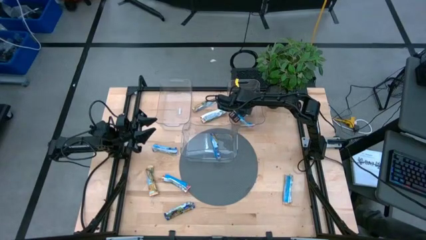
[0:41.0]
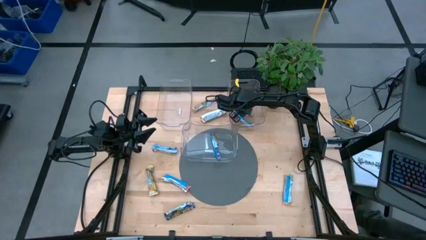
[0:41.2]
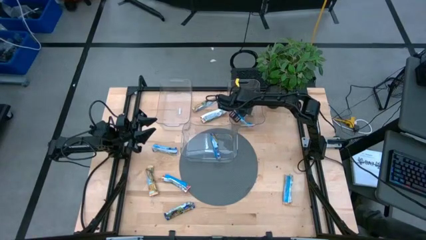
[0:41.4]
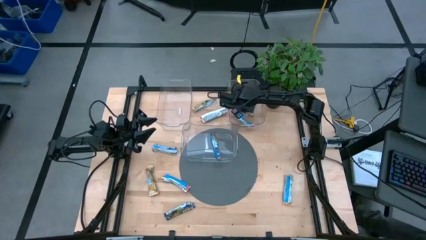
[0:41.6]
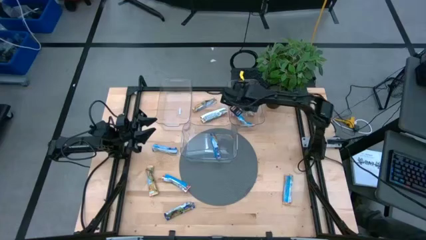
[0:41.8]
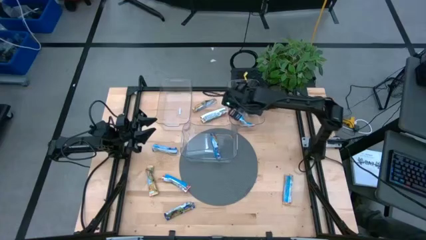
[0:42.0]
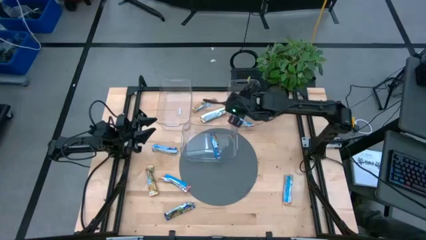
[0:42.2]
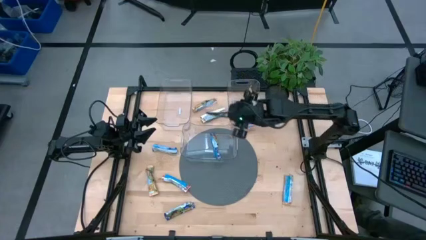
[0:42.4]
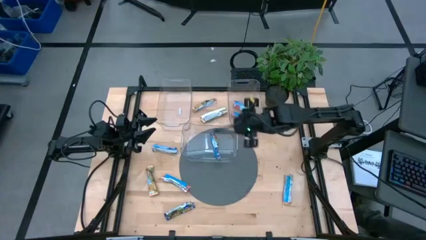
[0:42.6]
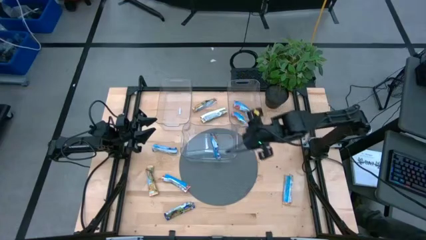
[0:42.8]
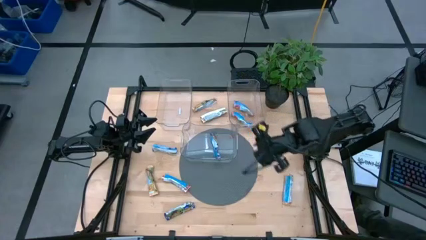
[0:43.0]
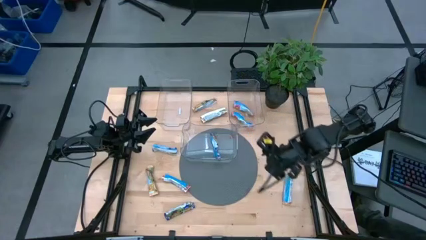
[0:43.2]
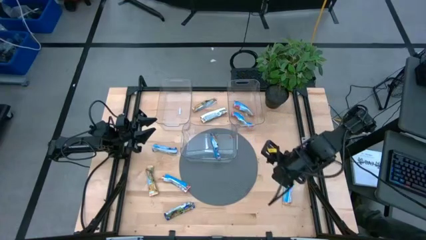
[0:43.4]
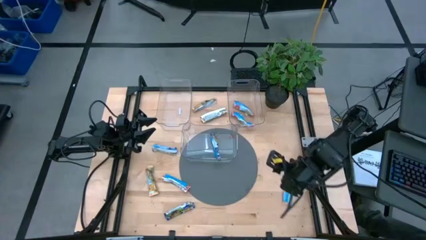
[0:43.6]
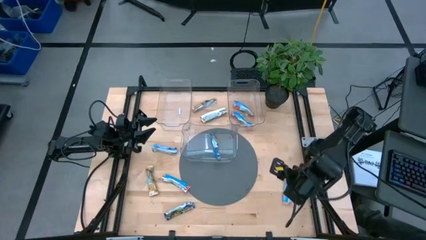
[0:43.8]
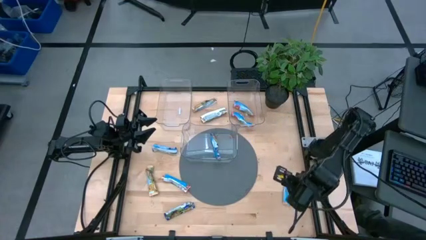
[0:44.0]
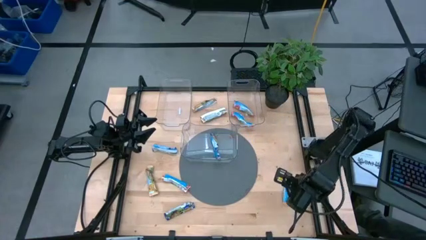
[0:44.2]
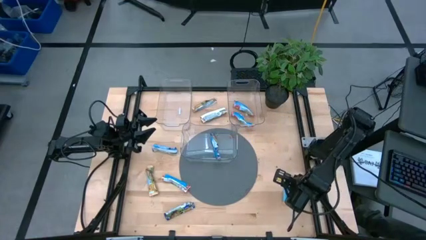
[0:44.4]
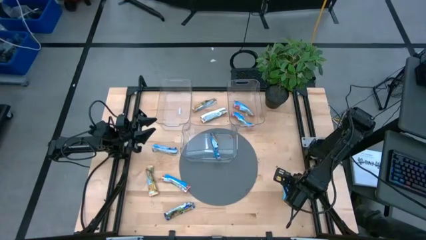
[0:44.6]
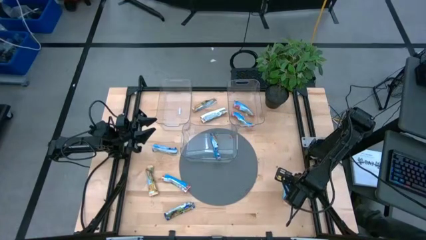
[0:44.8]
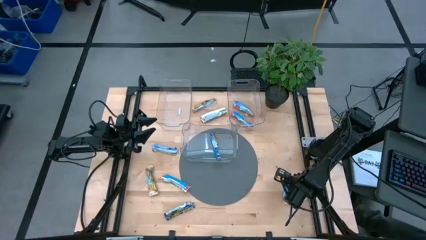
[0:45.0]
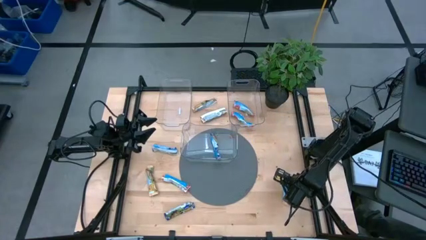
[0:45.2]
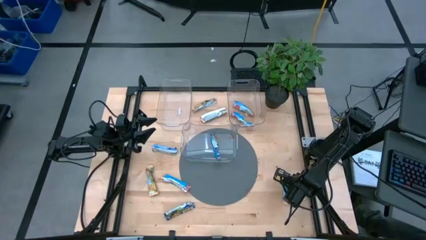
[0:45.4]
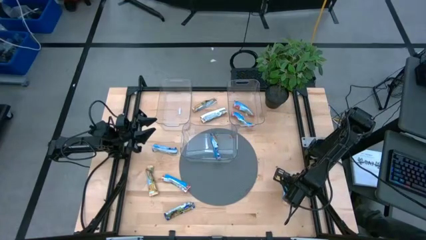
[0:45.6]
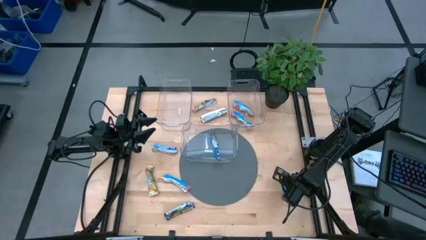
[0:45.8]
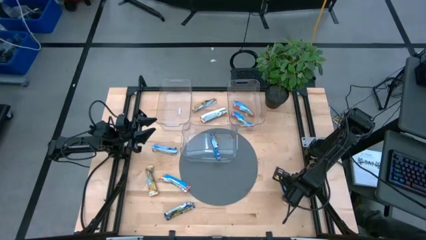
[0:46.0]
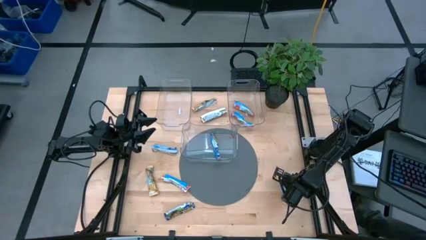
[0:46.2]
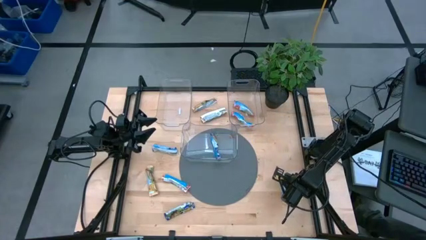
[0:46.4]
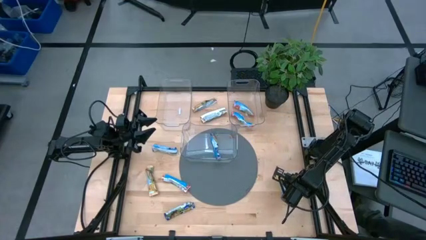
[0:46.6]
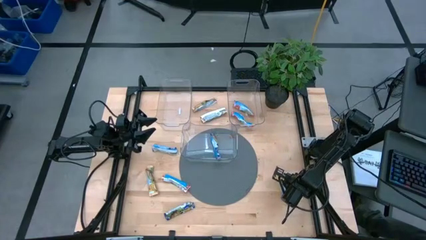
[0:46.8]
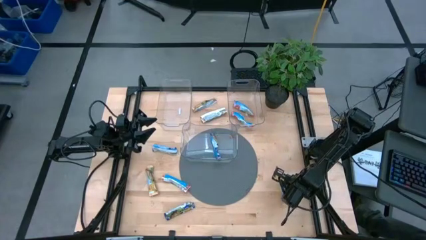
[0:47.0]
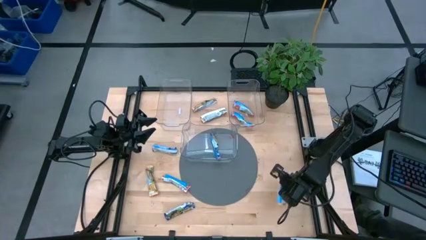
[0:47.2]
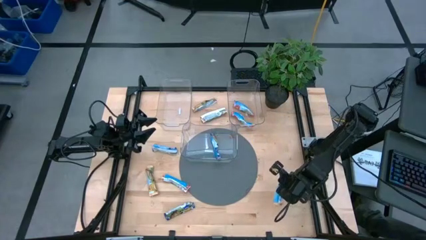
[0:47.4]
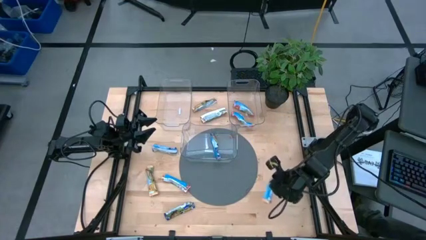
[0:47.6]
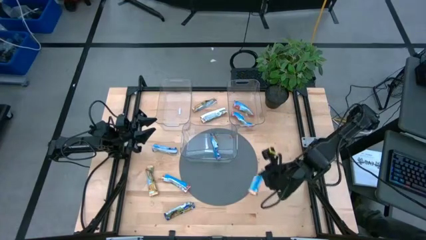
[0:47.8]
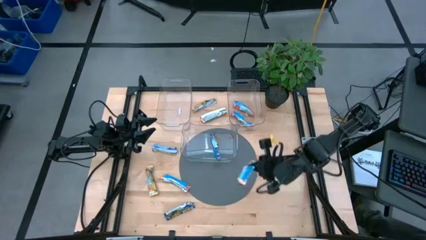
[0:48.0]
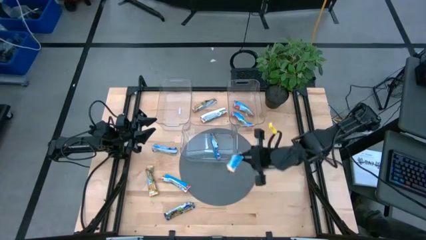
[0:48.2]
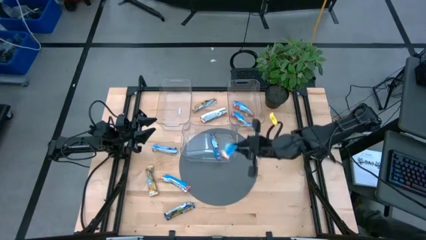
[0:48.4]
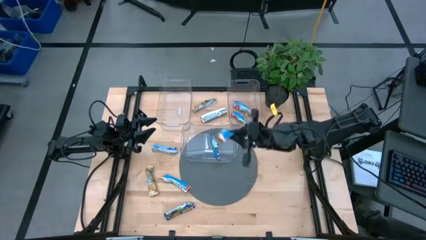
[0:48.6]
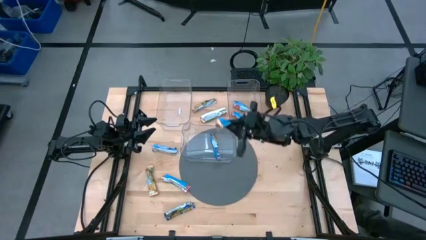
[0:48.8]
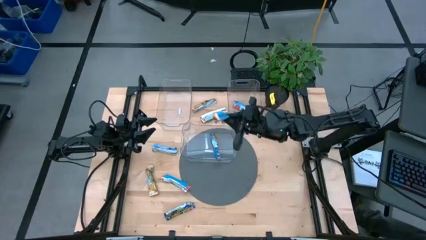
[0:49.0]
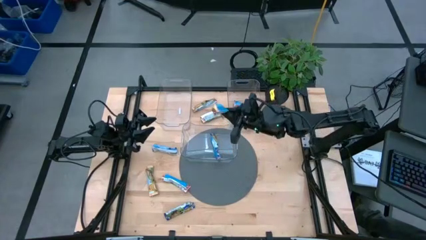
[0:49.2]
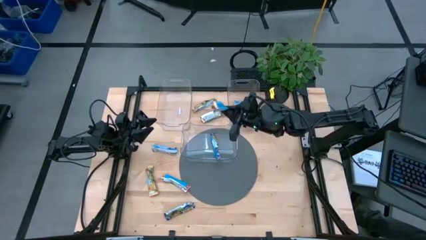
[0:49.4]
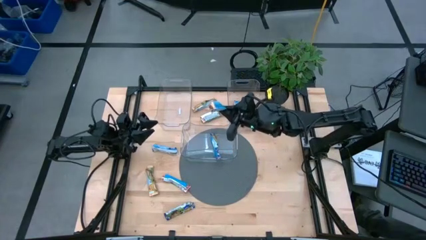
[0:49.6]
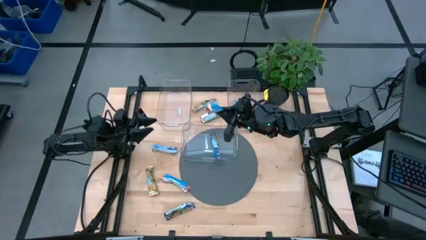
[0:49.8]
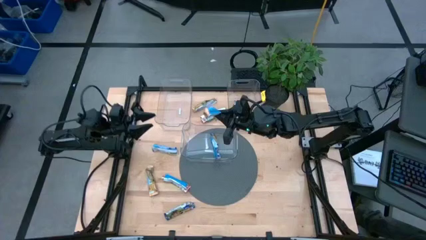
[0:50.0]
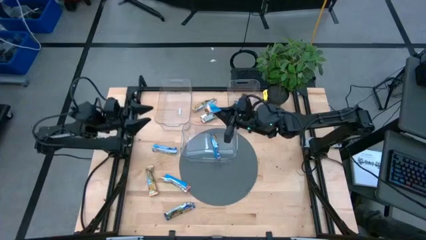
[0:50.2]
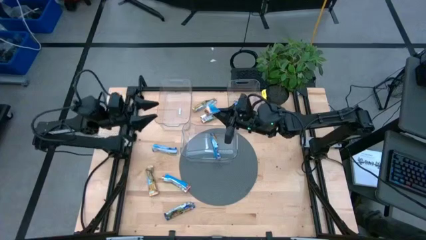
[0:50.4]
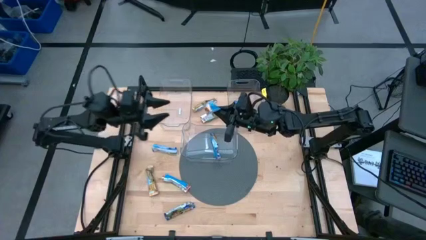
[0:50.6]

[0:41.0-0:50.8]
Task: Pick and place Granola Bars by type
Put the yellow granola bar into the top left transparent bin

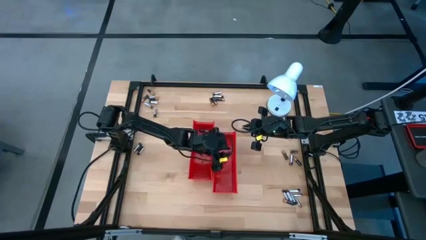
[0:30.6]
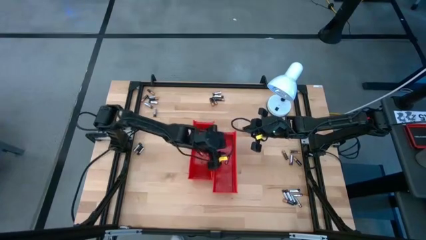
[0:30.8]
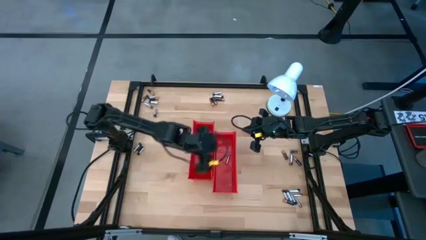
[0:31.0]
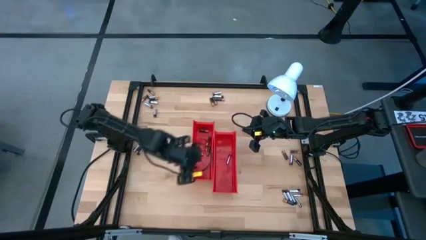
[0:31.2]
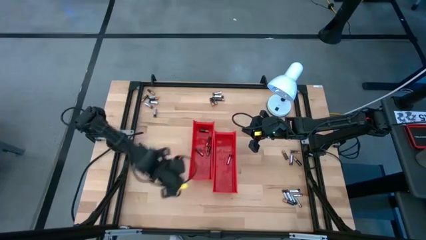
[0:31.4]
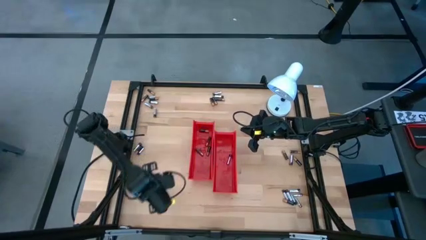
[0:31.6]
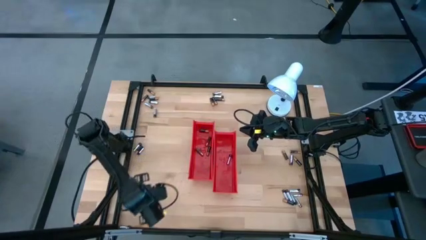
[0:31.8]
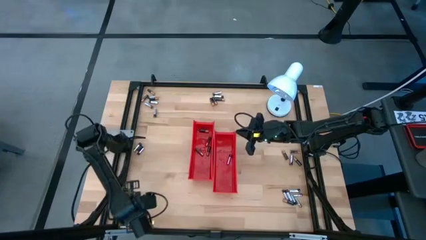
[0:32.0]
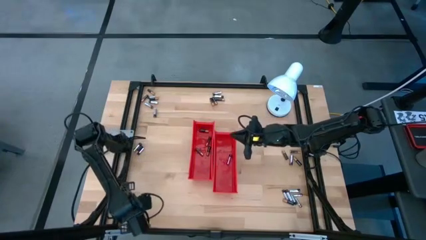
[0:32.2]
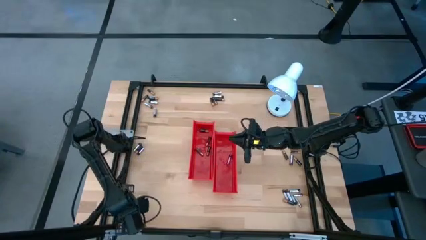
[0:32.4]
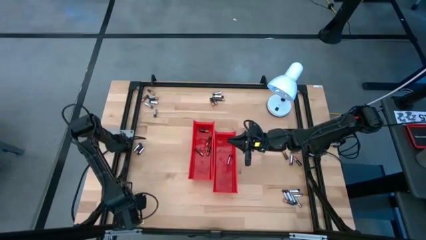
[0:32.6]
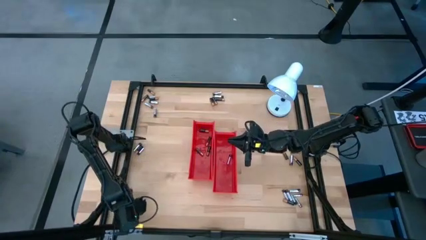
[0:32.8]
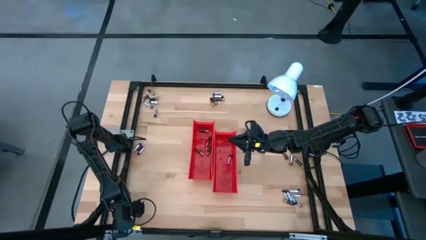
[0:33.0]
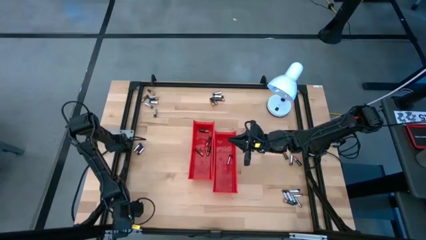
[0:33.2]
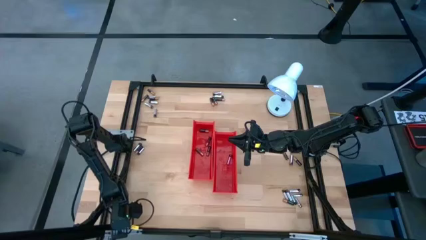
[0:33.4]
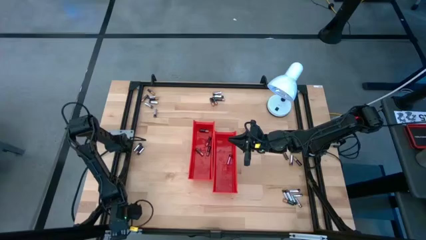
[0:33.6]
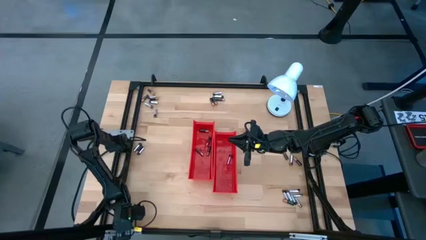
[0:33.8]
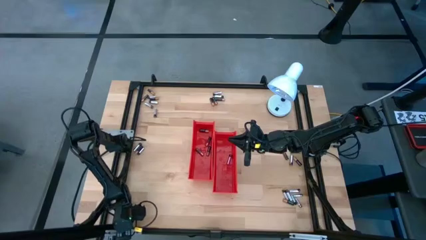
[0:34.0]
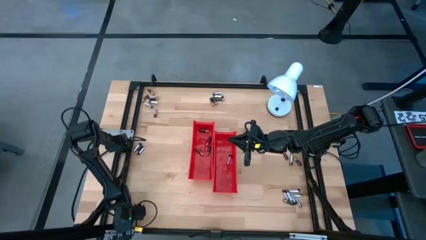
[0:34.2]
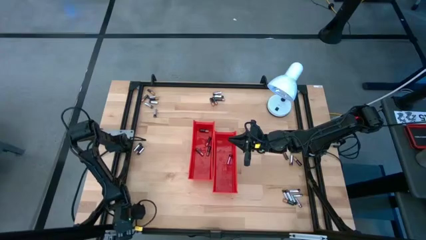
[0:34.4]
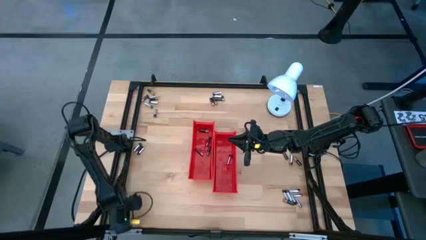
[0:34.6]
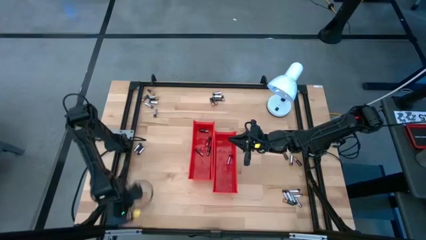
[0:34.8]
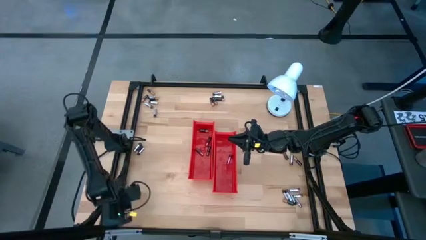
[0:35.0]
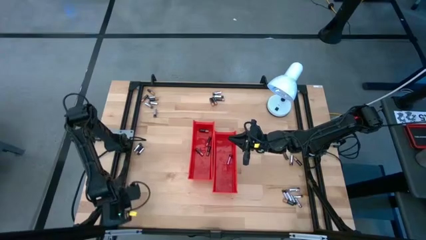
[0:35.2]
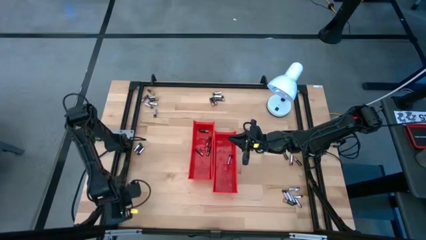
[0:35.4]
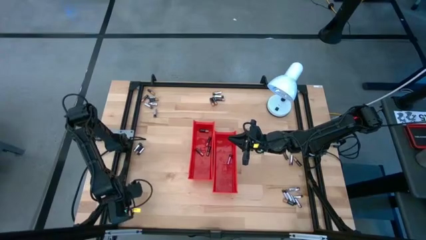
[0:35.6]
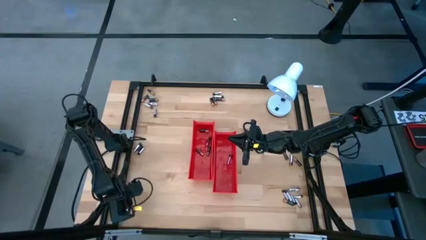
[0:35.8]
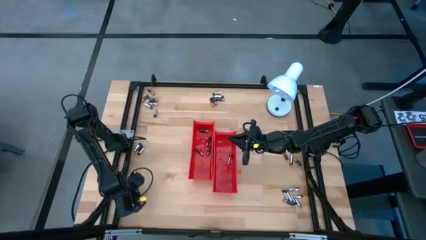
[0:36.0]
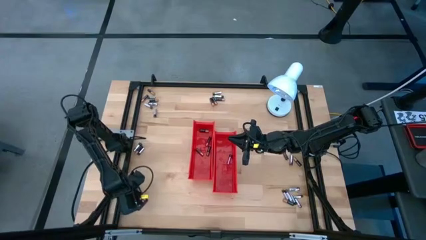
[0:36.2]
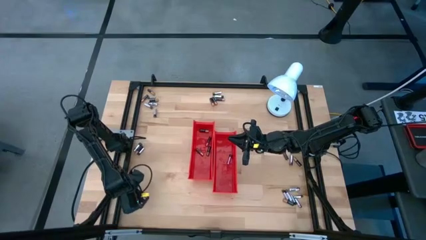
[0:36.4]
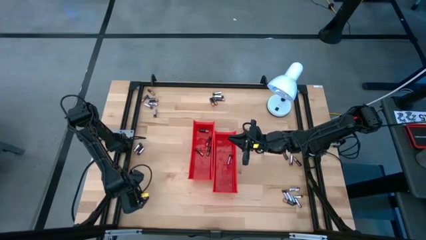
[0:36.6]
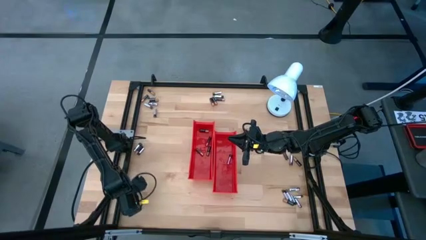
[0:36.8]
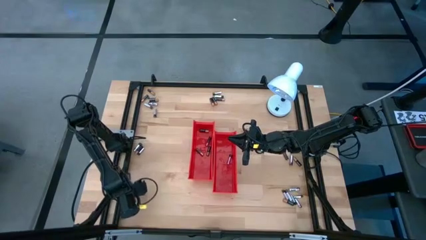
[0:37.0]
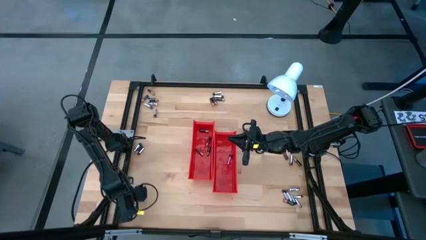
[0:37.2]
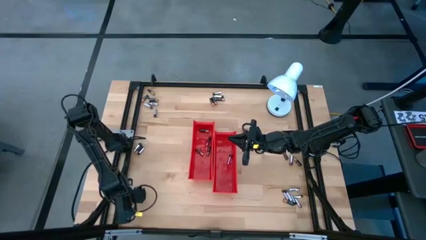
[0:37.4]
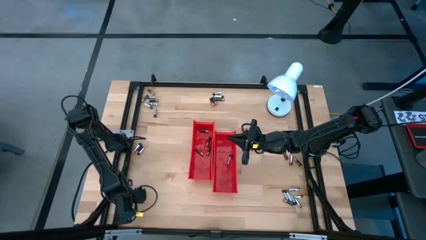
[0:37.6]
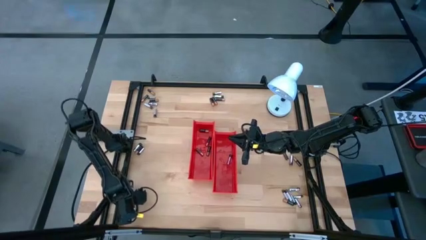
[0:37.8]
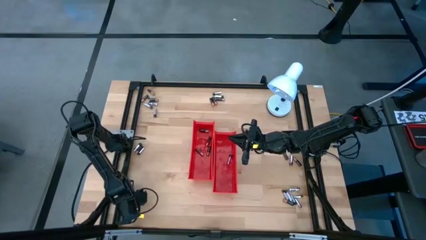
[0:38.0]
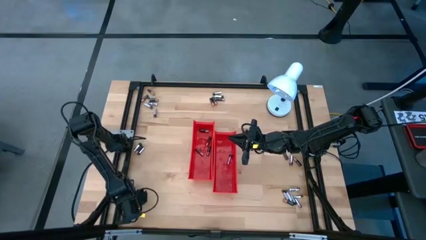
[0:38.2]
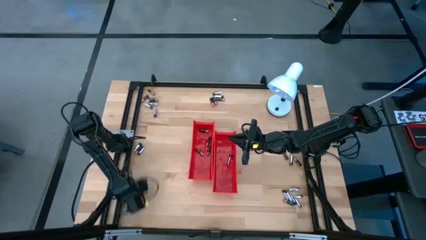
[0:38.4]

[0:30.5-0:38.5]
Task: Sort batteries
Move the silver battery to the middle left of the table
